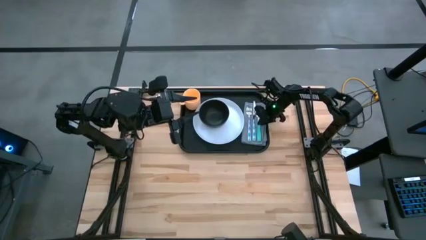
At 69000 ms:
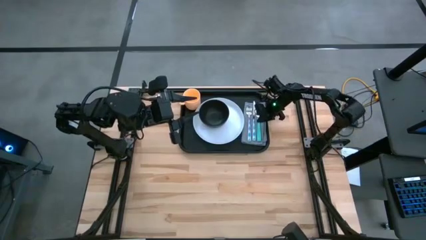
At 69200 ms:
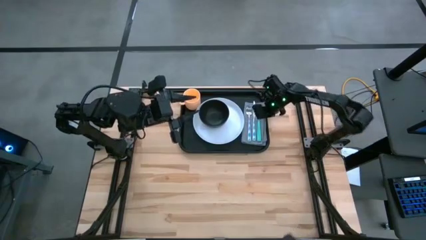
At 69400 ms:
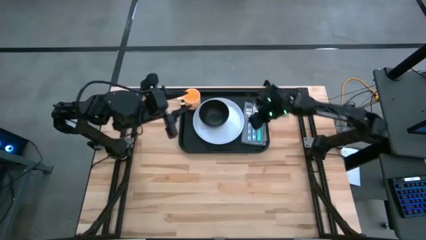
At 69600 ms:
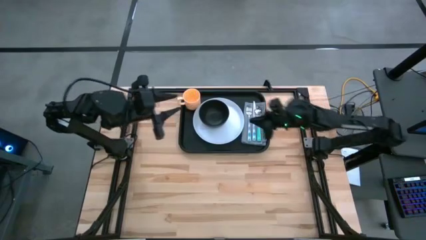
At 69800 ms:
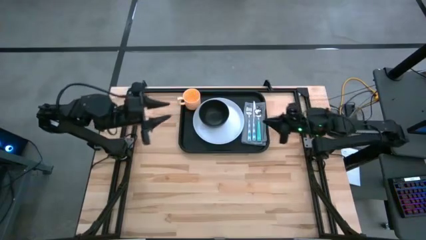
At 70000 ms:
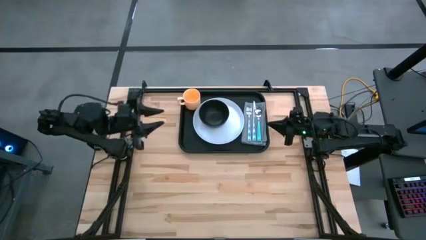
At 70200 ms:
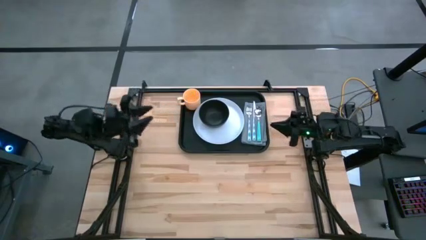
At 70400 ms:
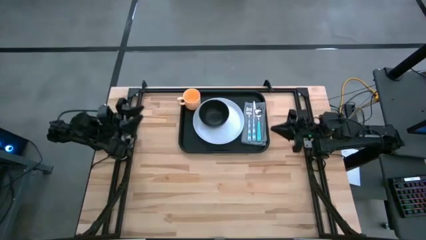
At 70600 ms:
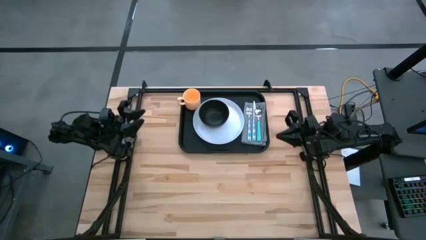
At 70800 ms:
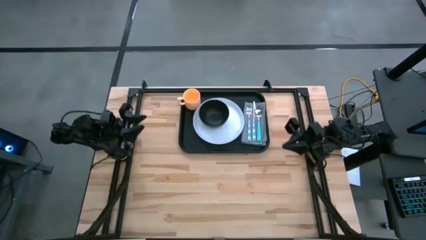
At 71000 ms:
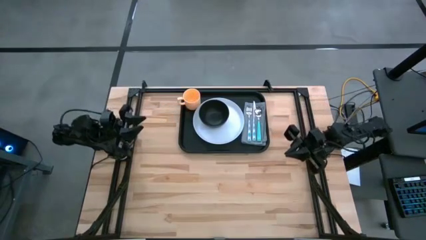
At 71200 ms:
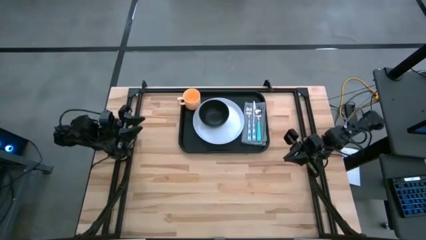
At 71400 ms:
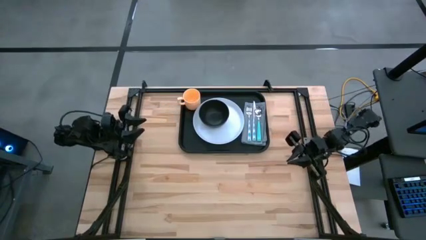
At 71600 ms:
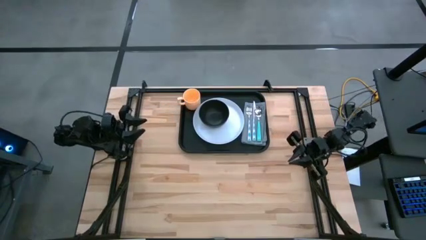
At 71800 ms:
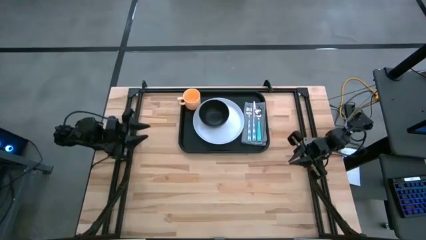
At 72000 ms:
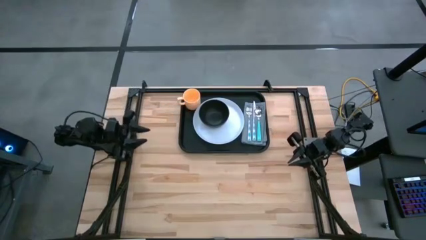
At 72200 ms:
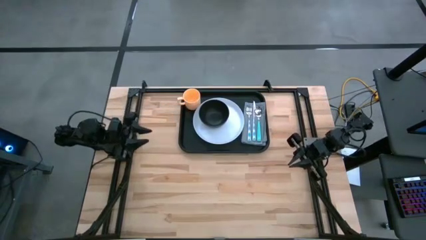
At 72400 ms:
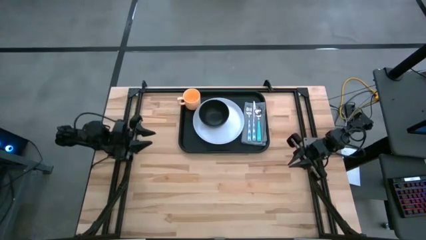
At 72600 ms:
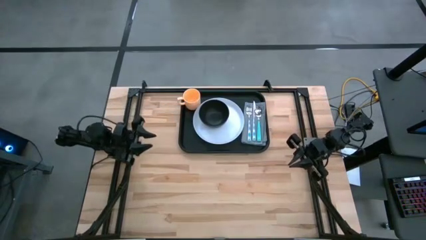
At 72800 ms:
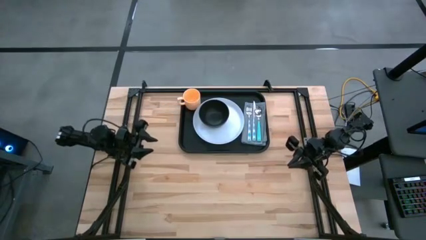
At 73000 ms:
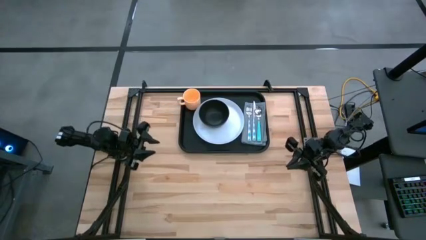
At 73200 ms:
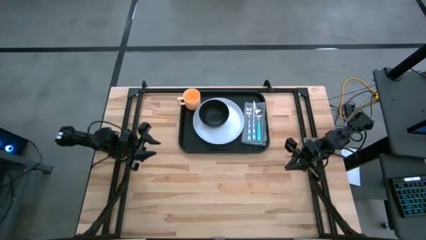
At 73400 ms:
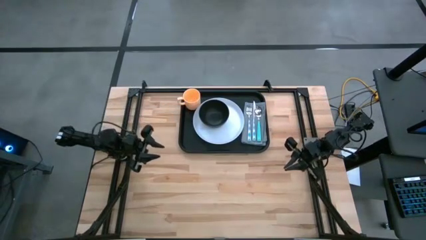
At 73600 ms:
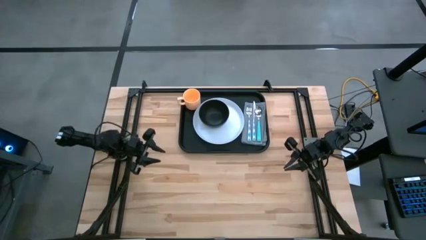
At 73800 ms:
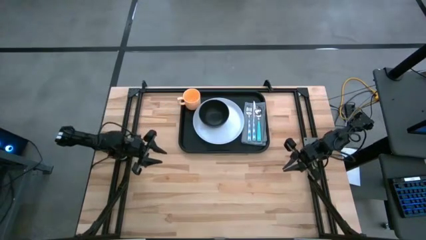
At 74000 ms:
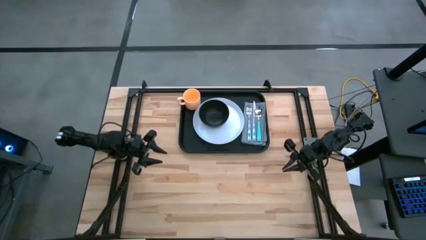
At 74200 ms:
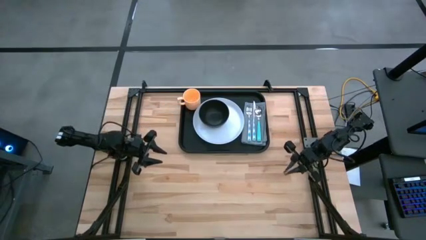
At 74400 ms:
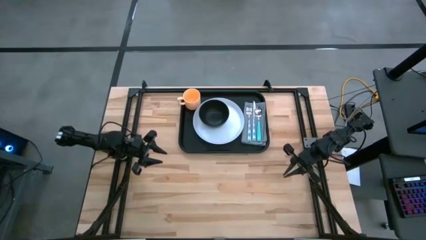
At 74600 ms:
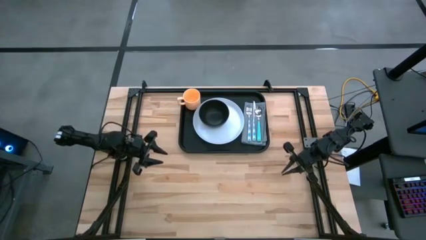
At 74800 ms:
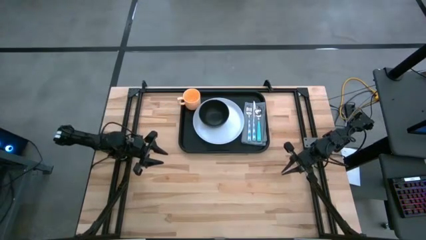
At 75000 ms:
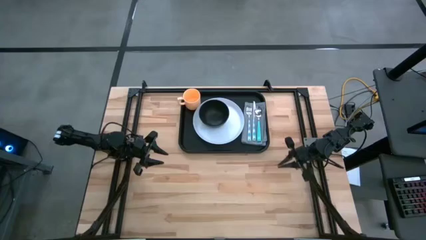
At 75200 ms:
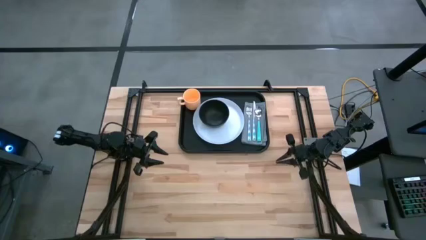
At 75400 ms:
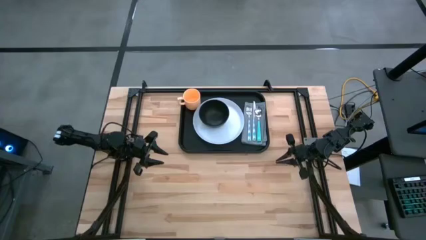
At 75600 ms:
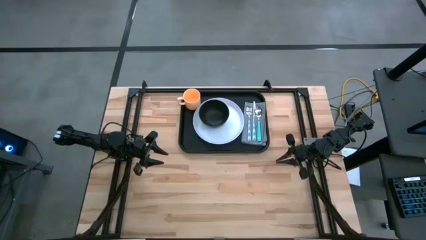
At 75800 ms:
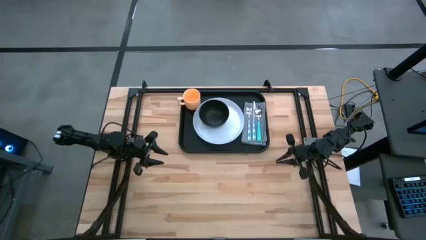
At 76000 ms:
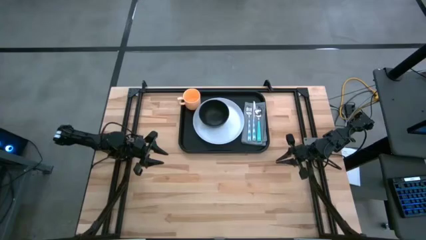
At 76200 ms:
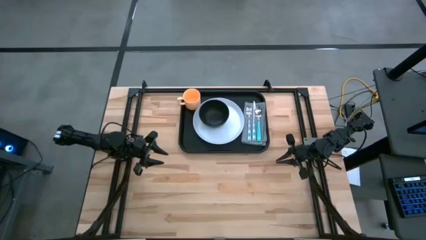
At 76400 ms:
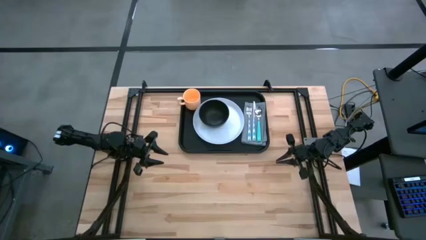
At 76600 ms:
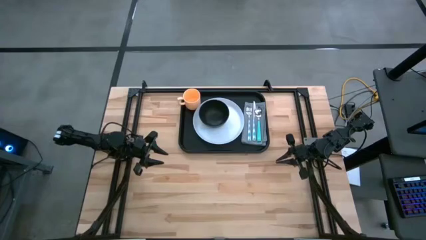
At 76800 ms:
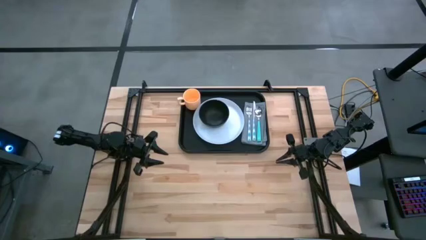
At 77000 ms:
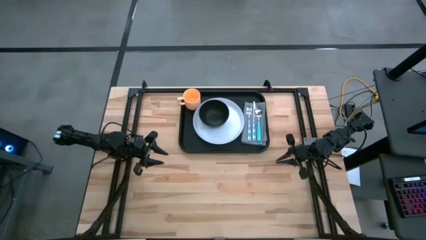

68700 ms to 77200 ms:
Task: Set up tray
Return to Home Position

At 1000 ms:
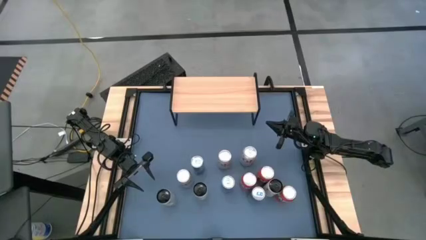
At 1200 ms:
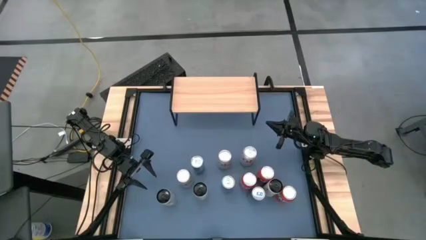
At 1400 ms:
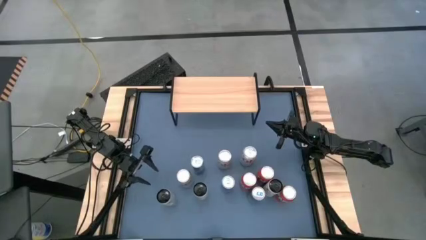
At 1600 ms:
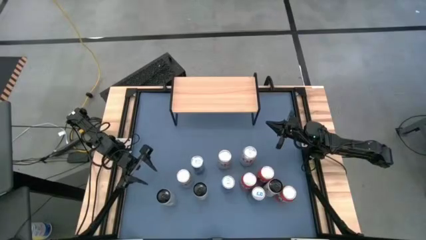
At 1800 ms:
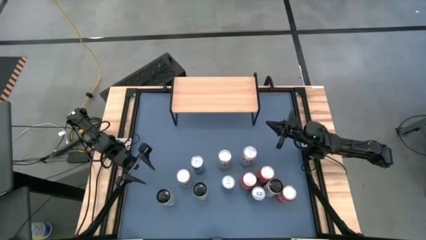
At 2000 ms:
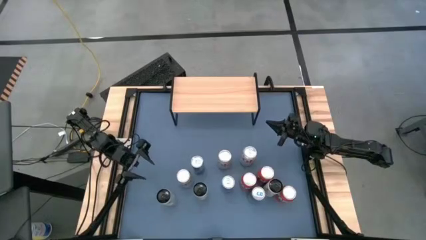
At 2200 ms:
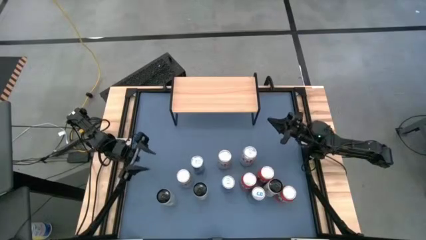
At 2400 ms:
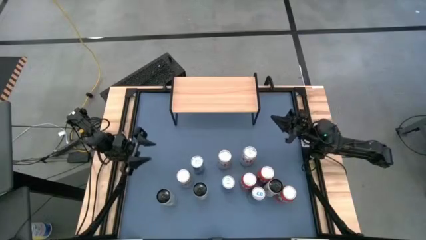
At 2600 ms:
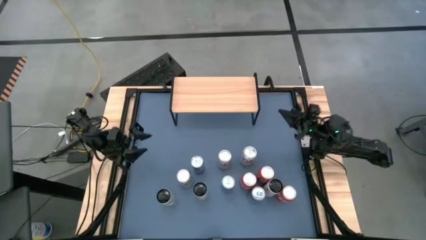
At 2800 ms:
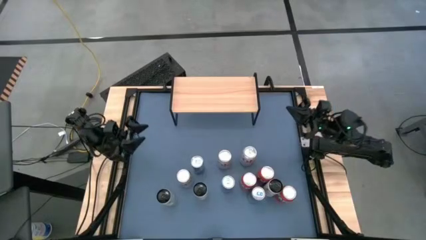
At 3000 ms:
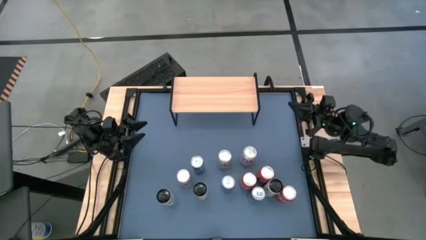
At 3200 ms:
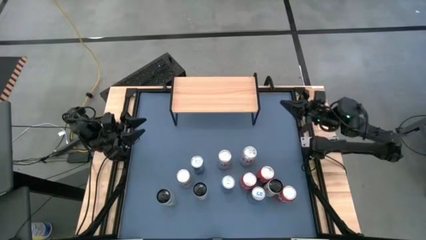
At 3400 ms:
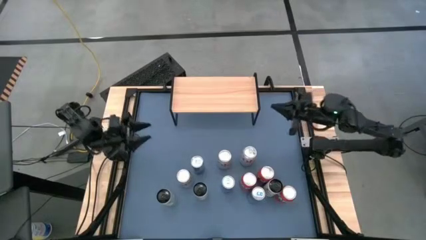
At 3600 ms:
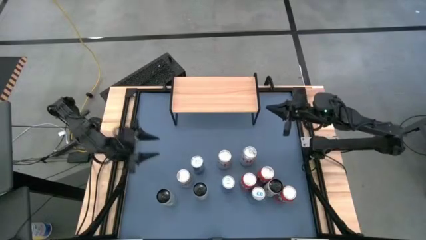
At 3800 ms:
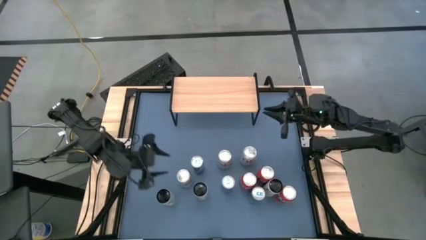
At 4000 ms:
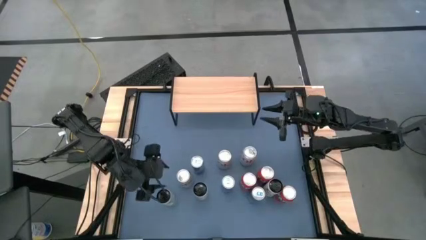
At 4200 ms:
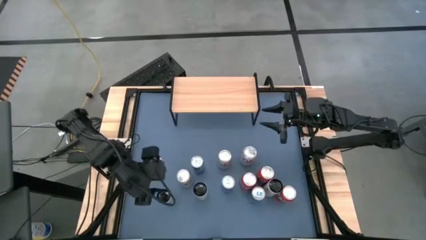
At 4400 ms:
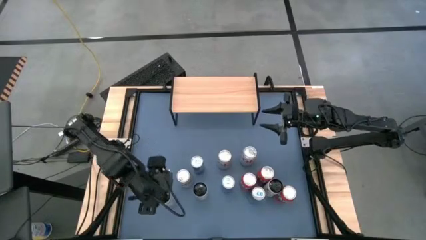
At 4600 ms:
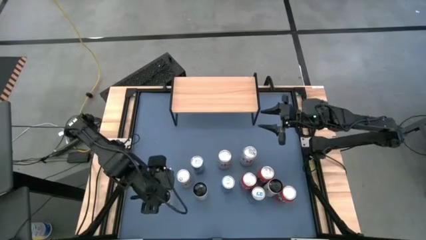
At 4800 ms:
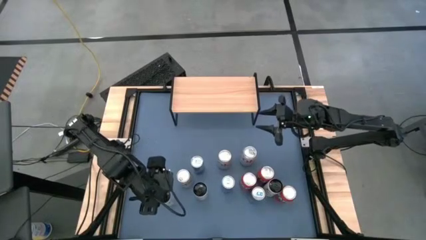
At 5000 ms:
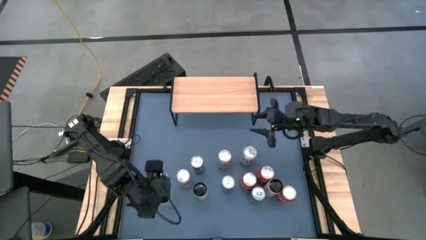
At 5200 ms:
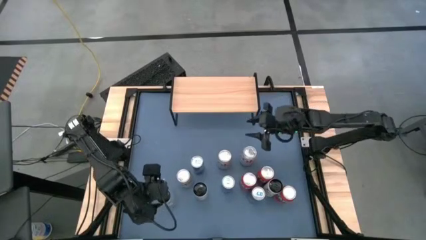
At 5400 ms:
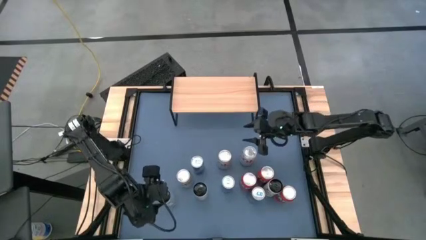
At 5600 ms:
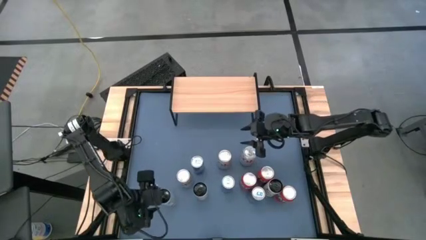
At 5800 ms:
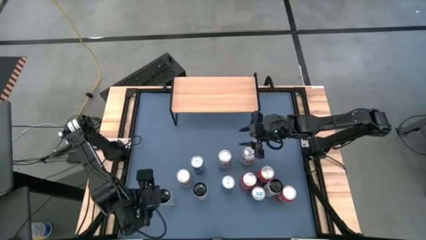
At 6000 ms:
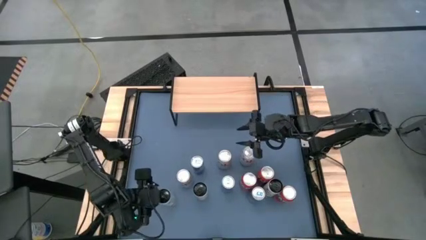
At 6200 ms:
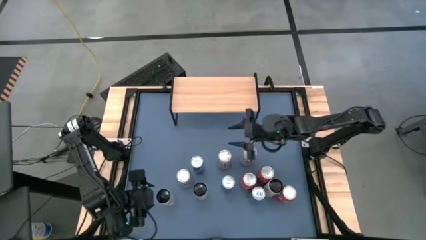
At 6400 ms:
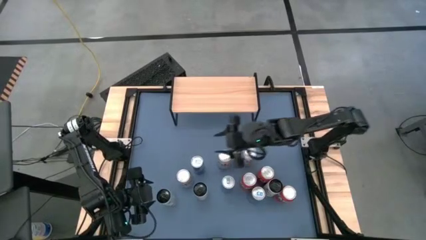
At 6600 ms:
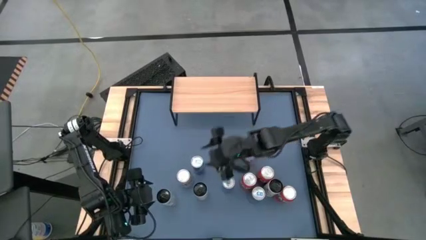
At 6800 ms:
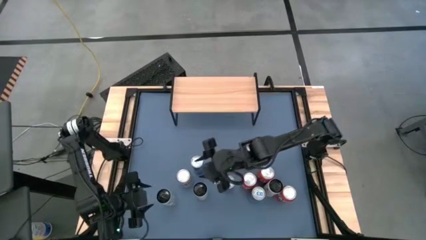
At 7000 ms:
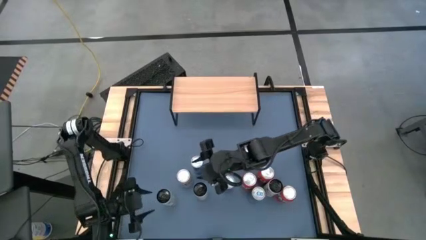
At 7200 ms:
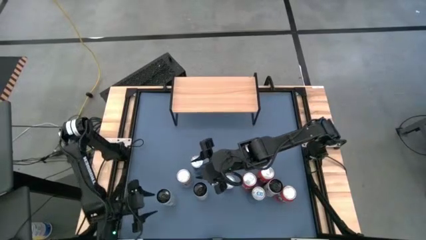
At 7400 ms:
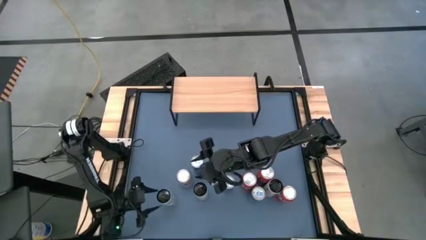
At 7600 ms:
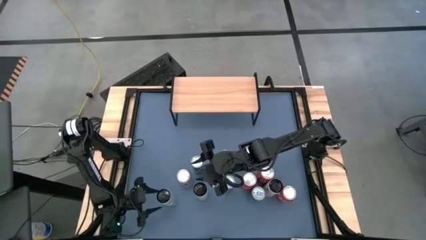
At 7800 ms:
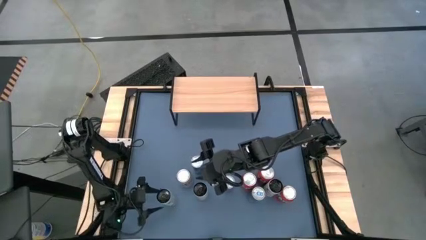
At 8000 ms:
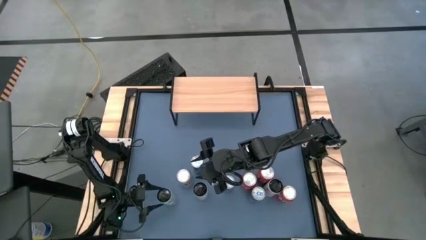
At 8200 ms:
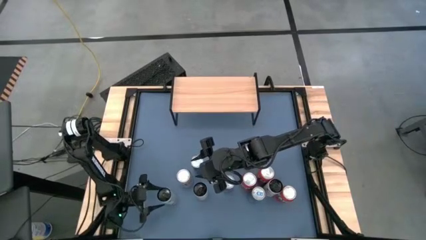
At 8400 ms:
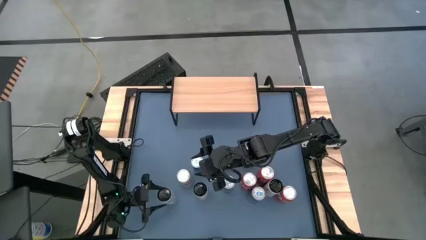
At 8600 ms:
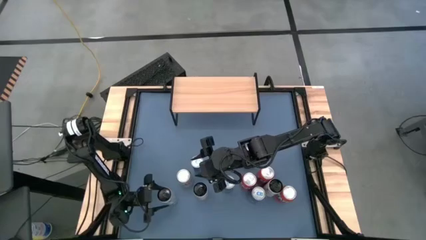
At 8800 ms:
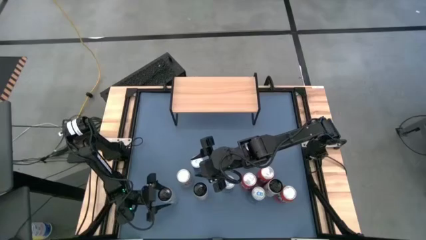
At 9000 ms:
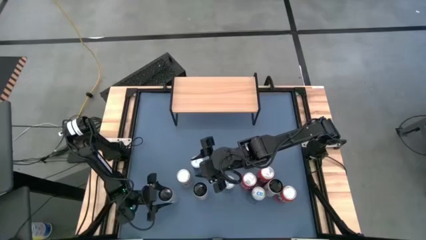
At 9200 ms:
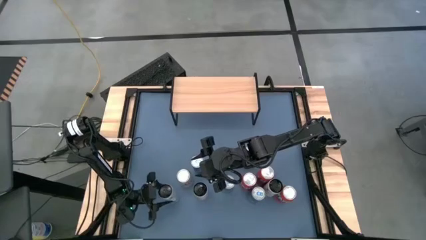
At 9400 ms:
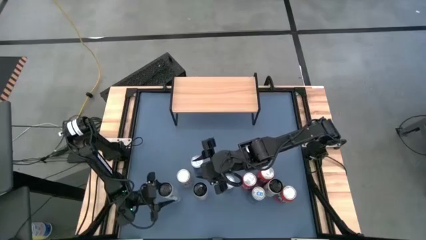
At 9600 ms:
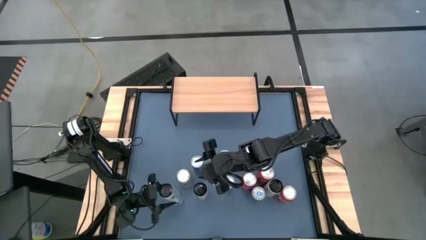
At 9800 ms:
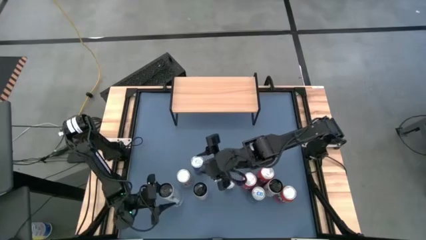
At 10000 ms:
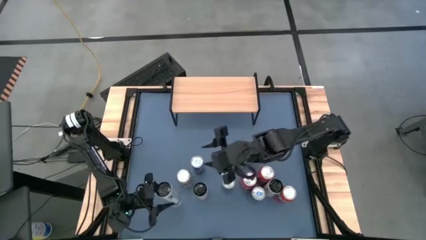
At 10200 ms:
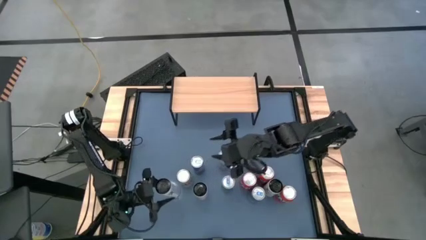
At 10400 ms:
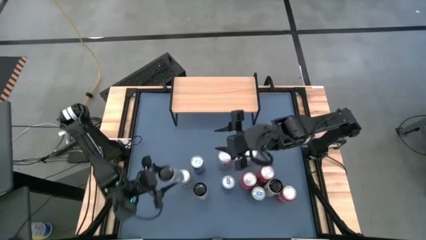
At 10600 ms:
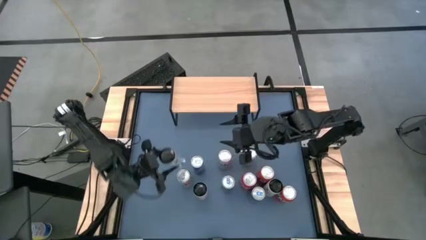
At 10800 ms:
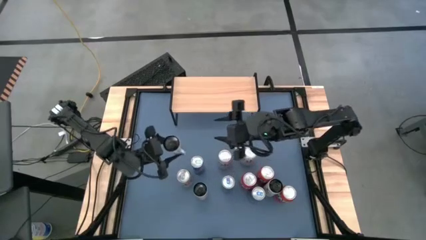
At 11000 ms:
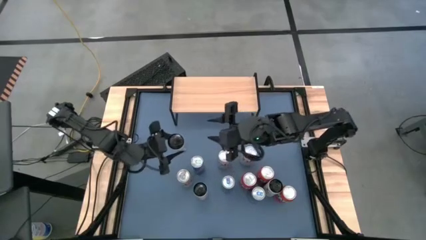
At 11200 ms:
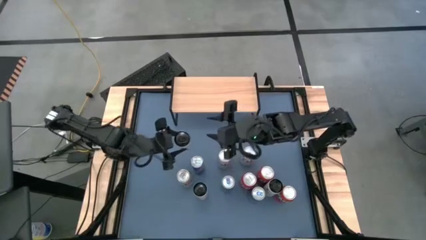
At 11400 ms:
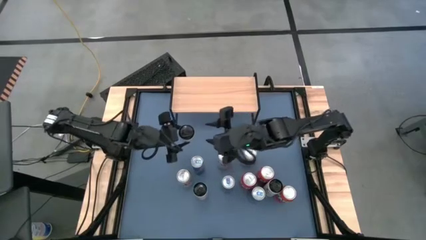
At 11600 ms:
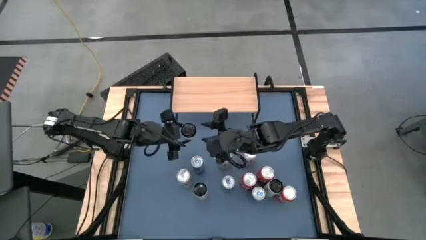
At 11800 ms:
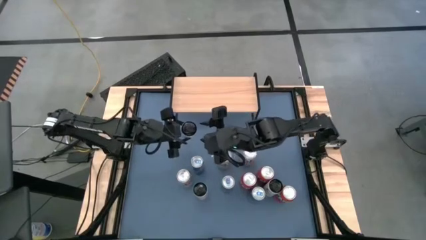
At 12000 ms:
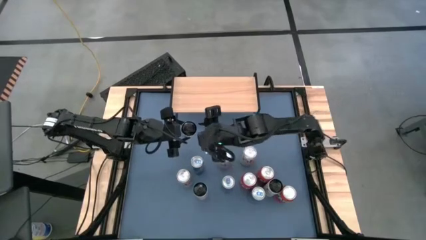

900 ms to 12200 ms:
Task: Place canned beverage on shelf
Put the bottom left black soda on the shelf
